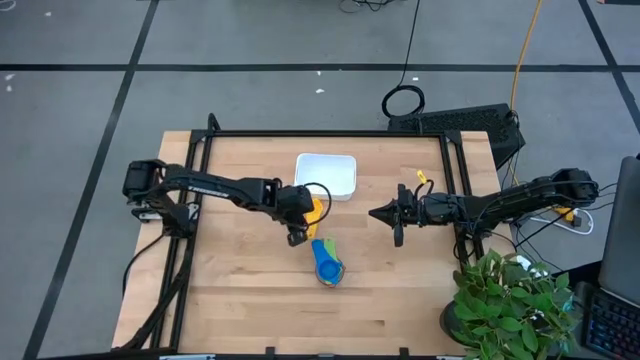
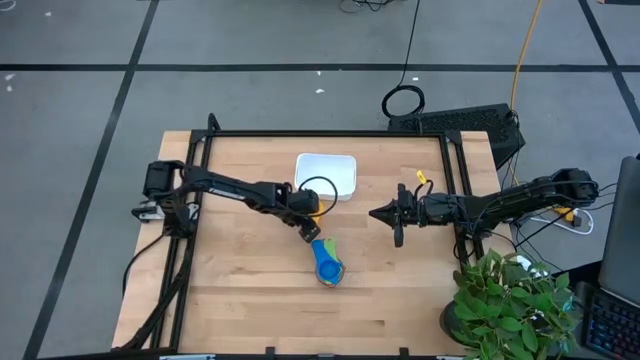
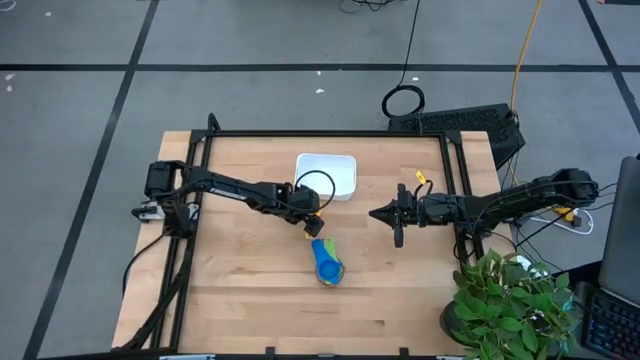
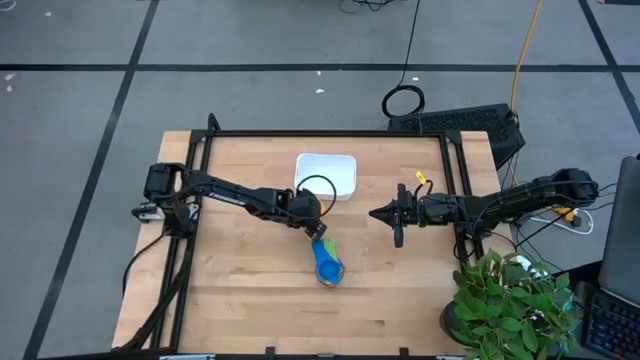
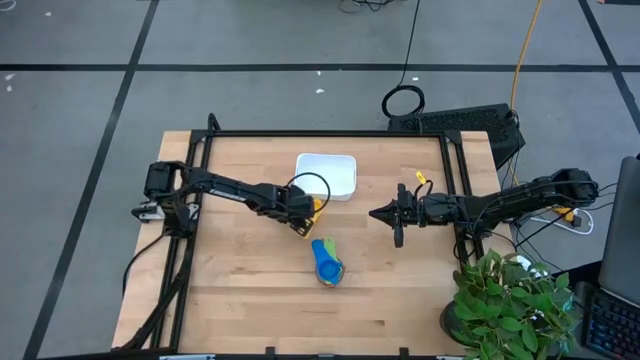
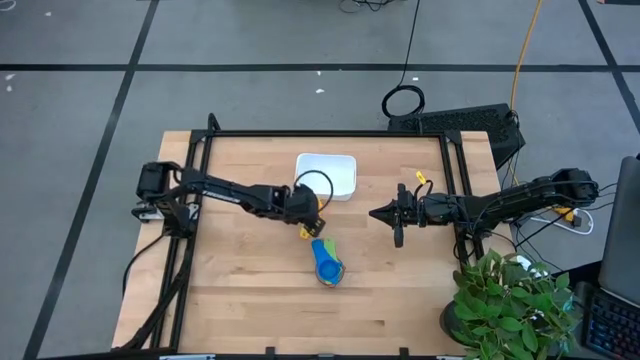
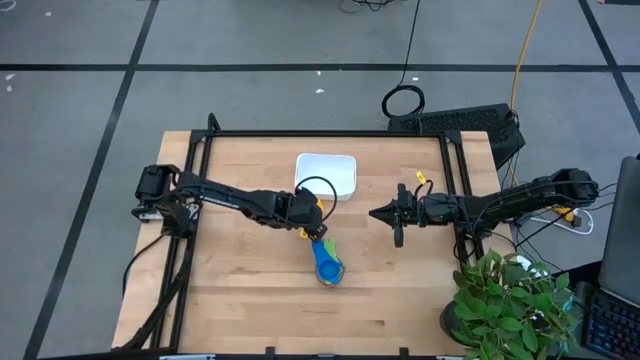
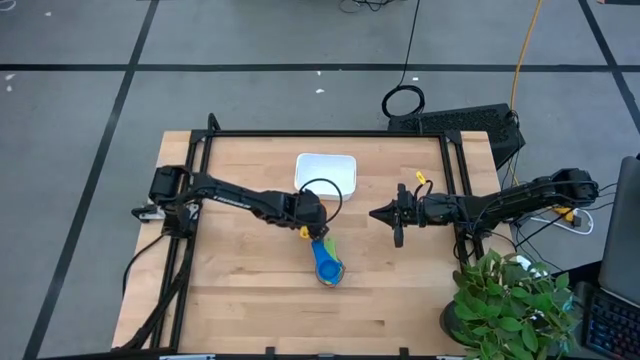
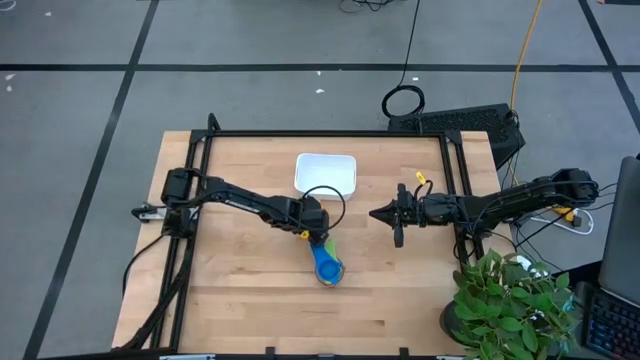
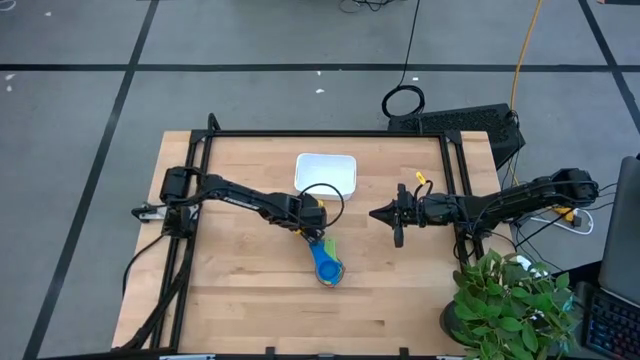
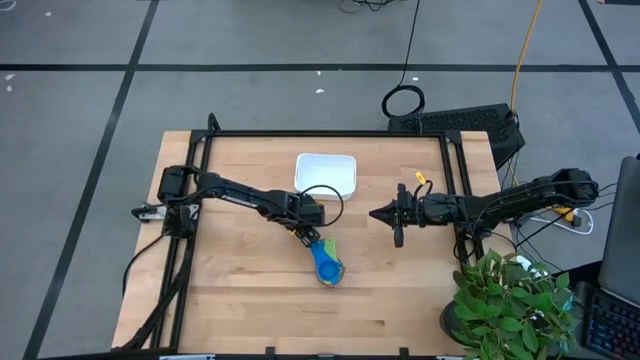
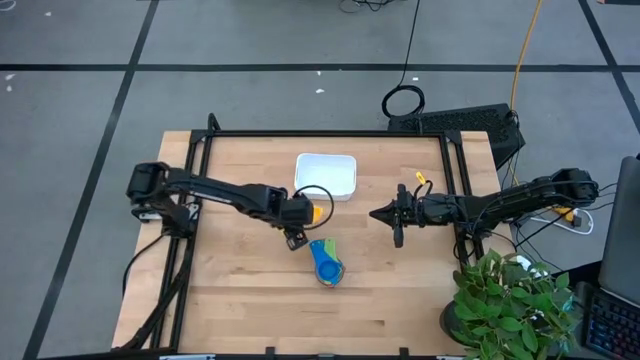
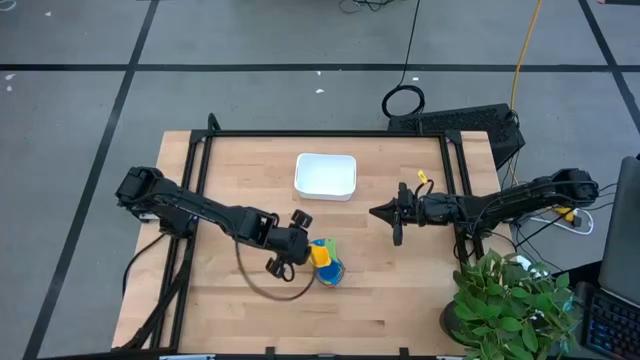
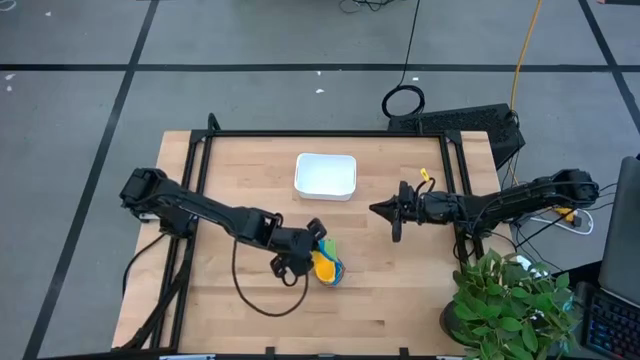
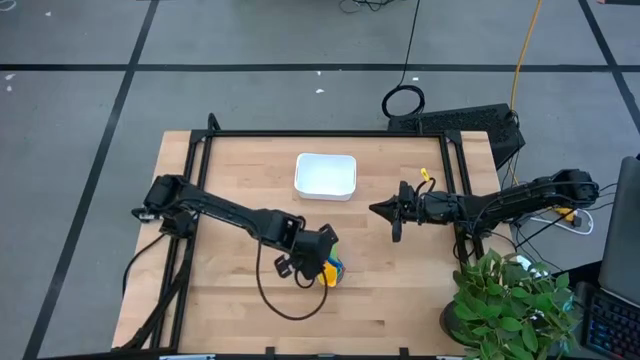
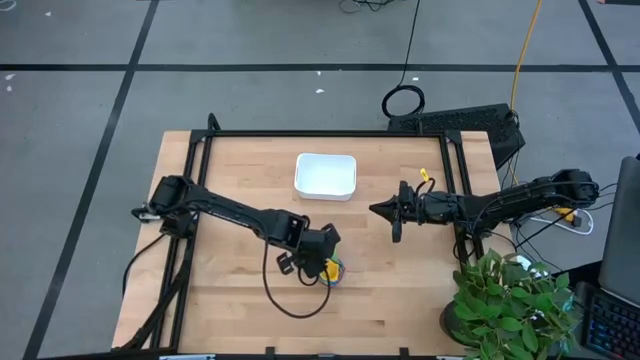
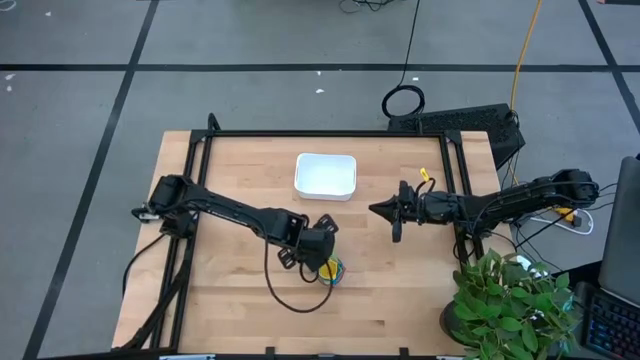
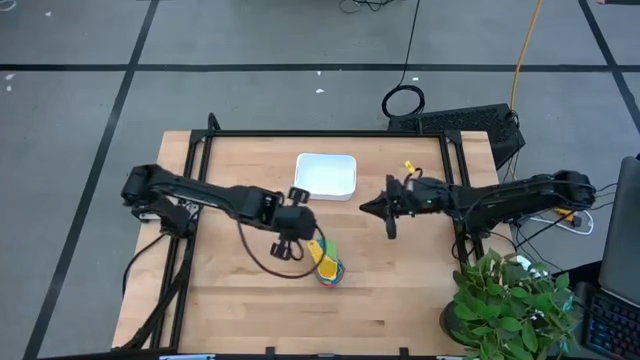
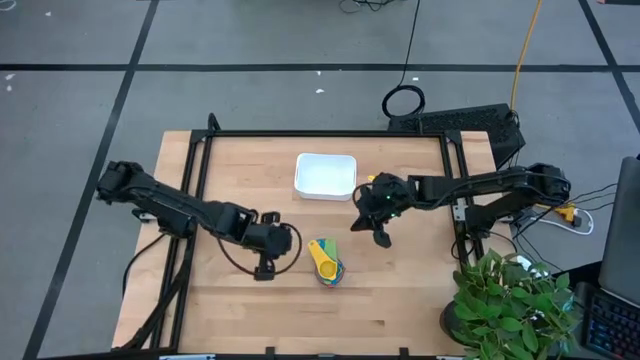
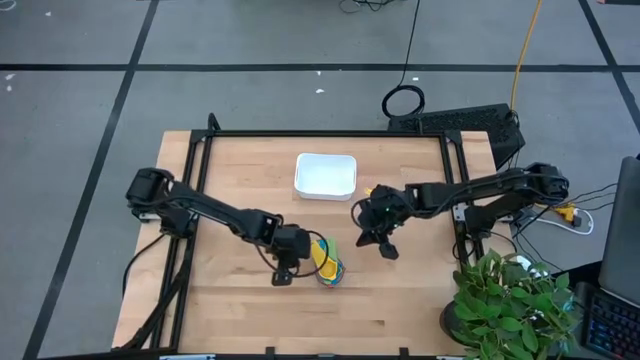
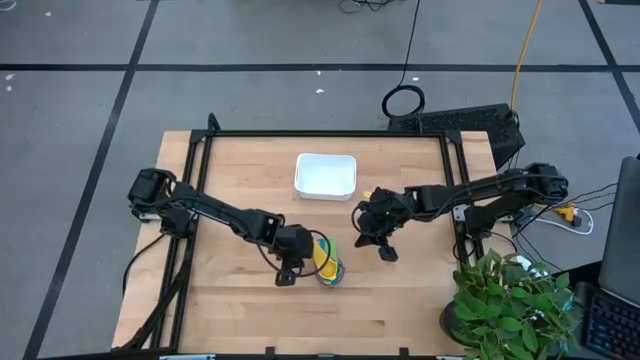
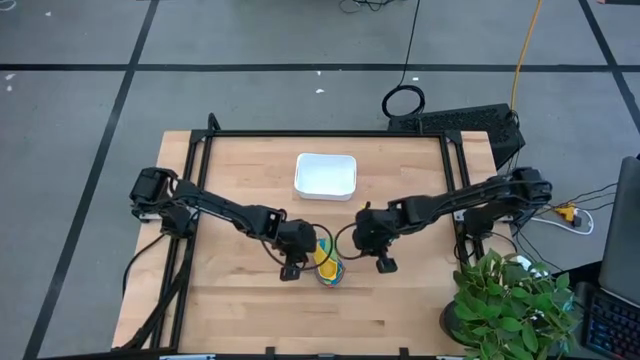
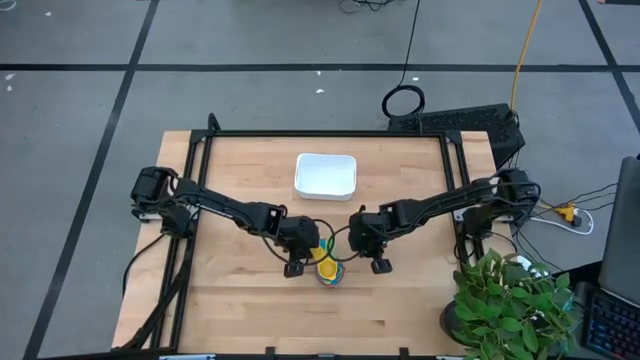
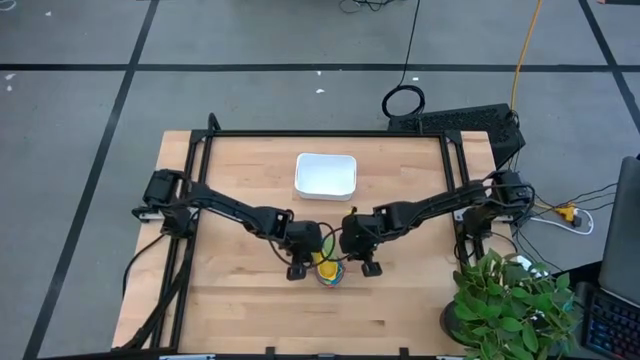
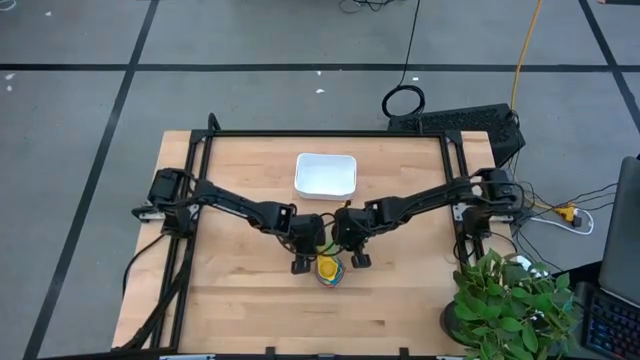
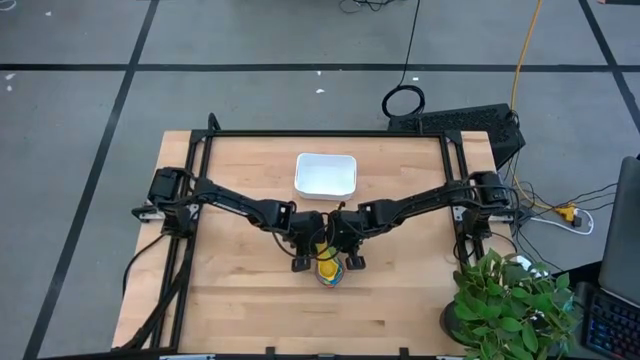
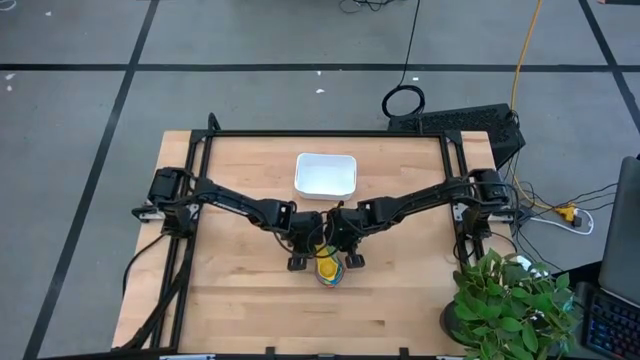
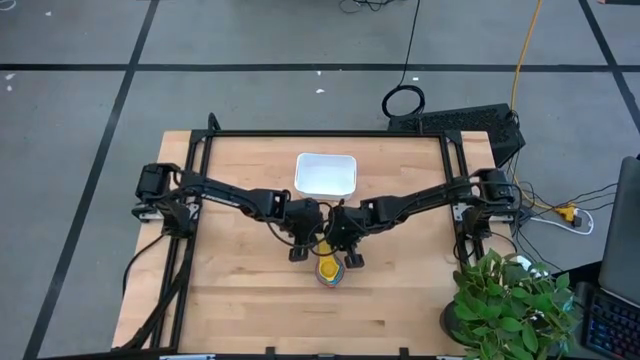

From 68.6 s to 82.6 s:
Task: Nest measuring cups in basket
Stack the yellow measuring cup on top of the blue measuring cup

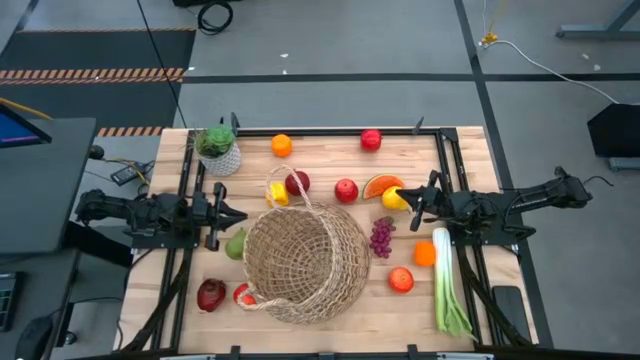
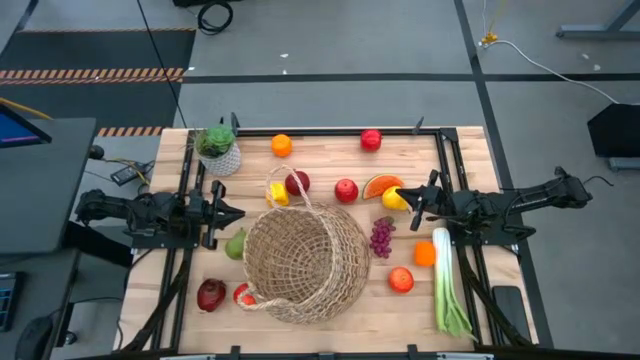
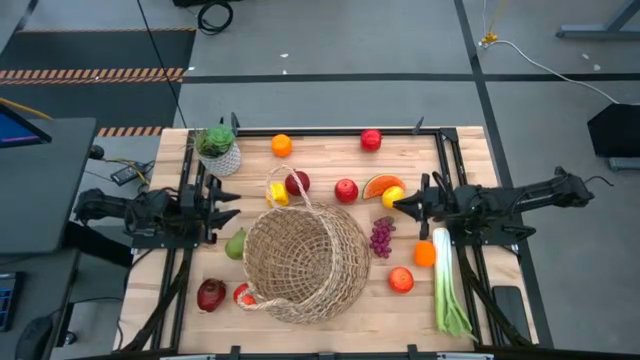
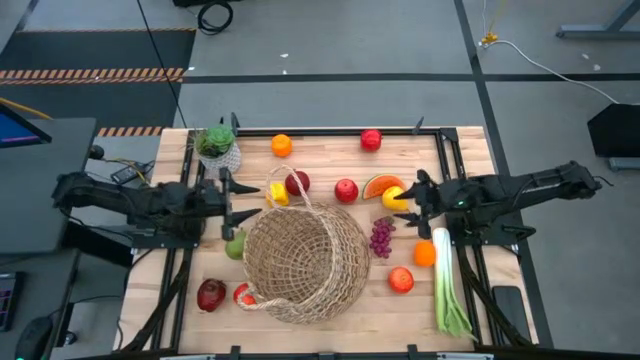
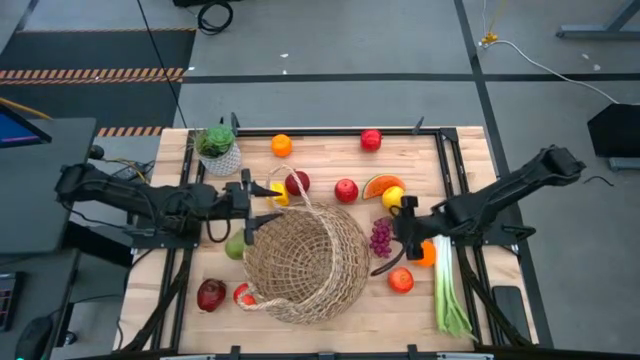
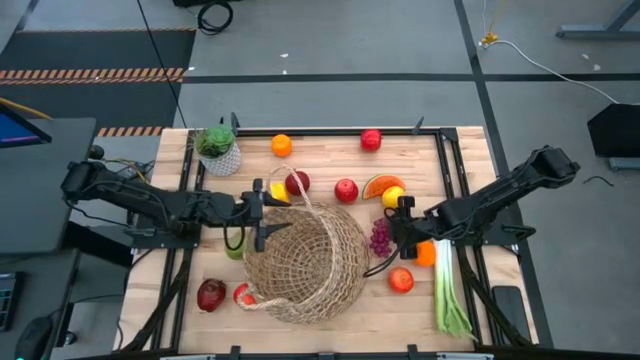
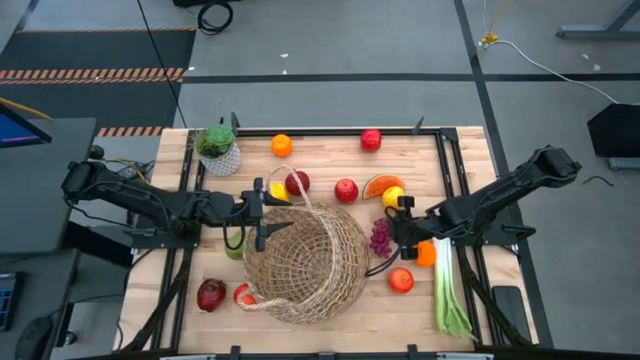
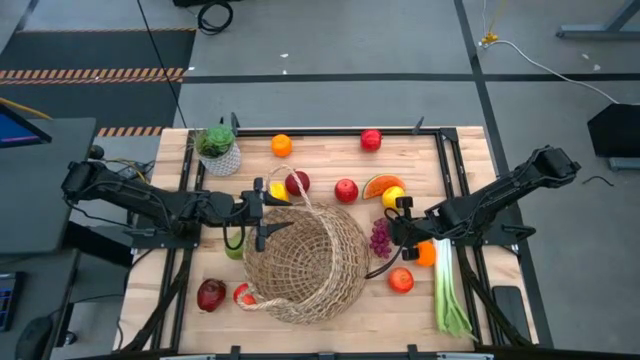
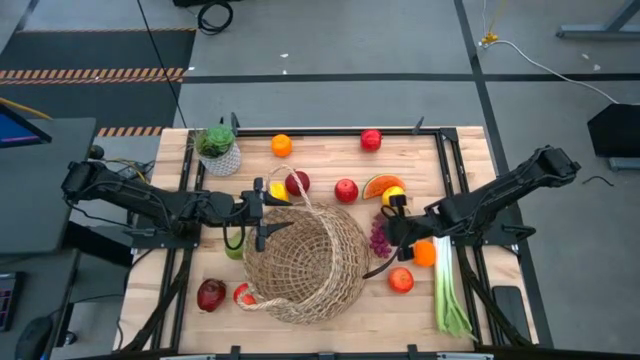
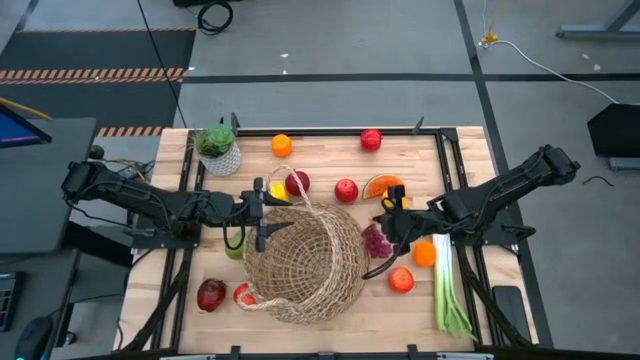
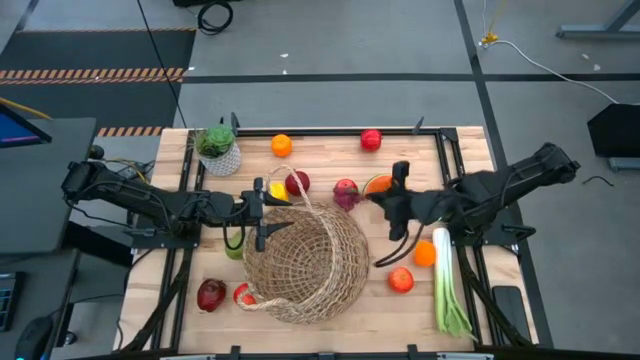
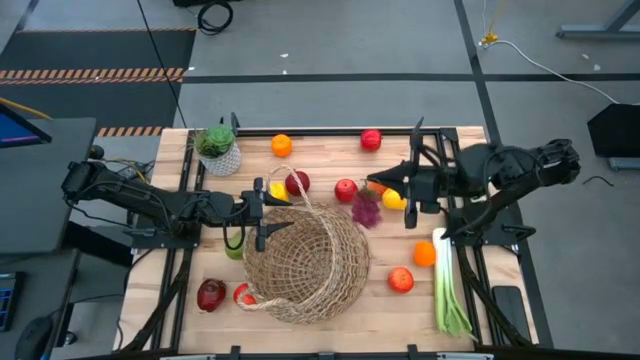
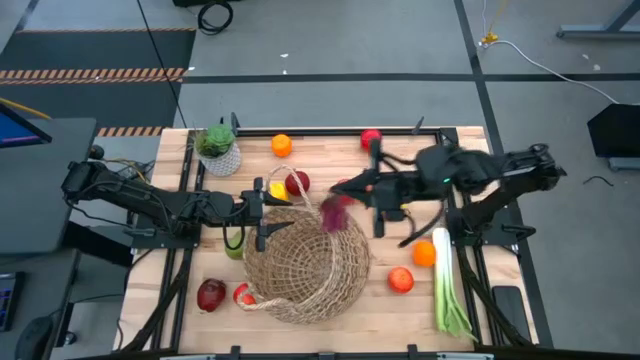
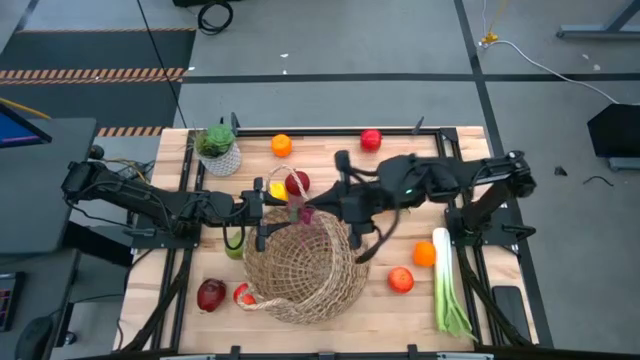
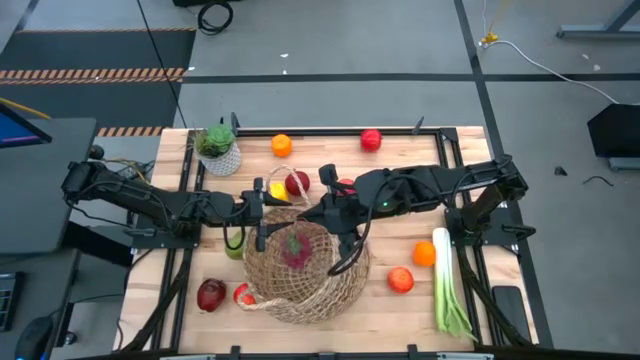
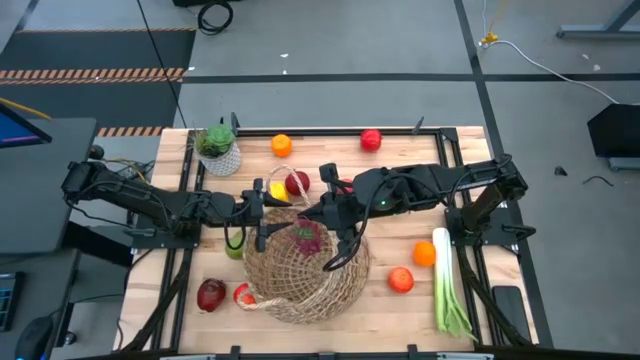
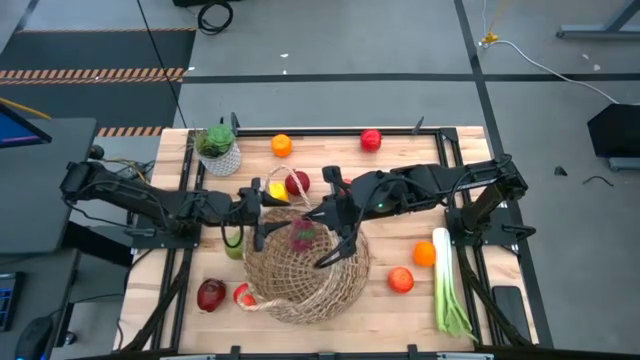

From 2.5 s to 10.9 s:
Task: Build produce basket
Put the grapes into the basket
